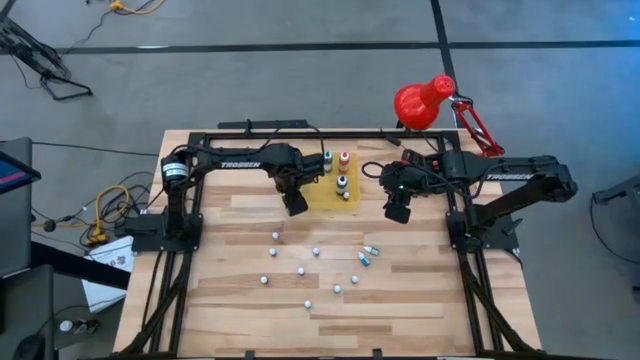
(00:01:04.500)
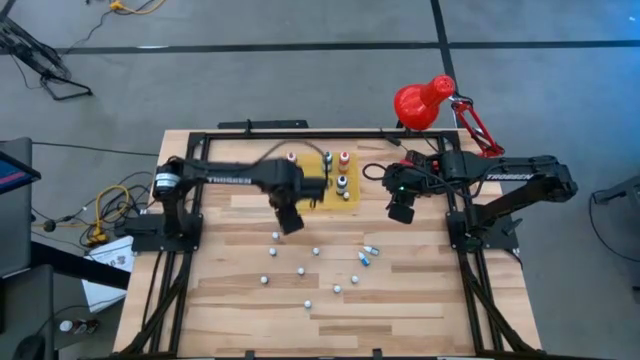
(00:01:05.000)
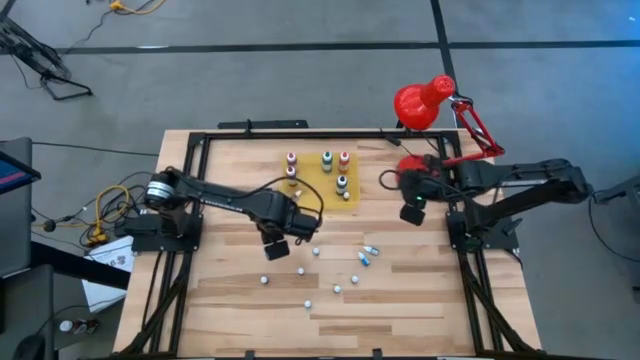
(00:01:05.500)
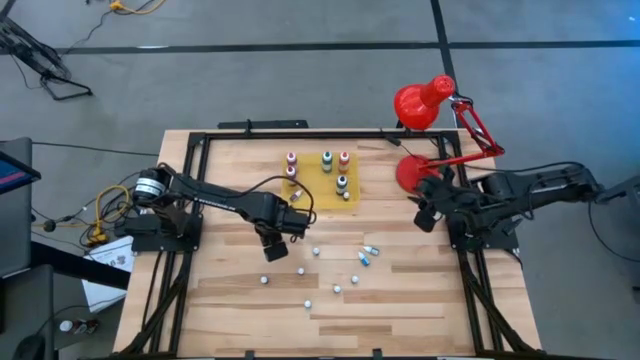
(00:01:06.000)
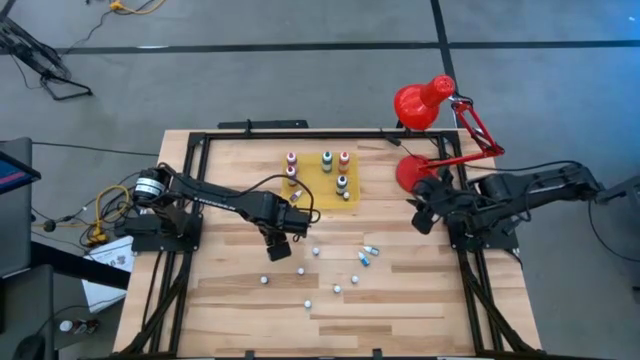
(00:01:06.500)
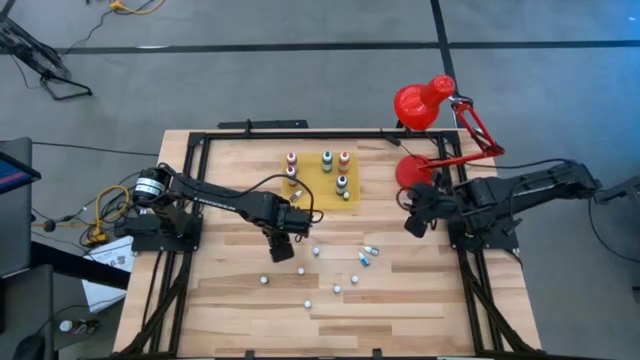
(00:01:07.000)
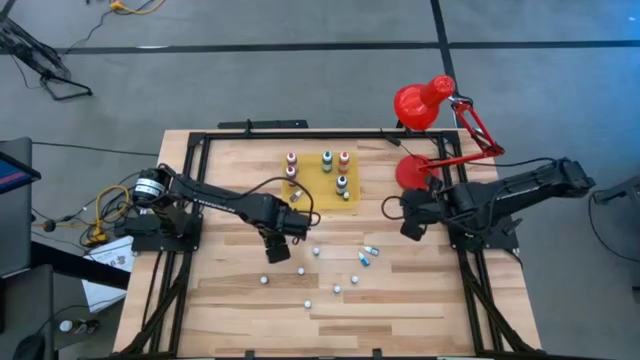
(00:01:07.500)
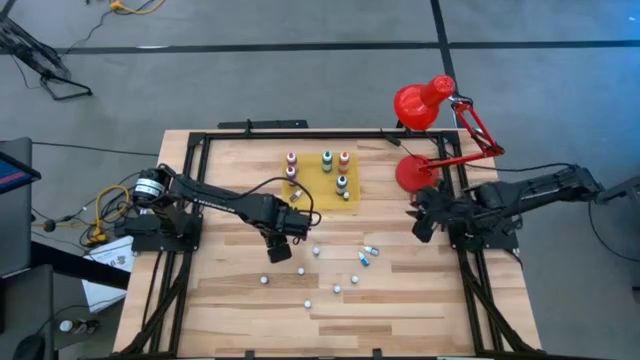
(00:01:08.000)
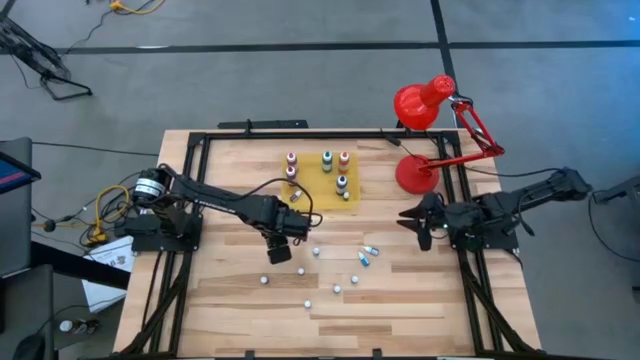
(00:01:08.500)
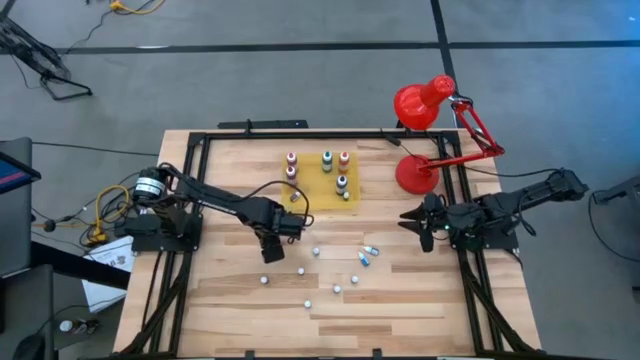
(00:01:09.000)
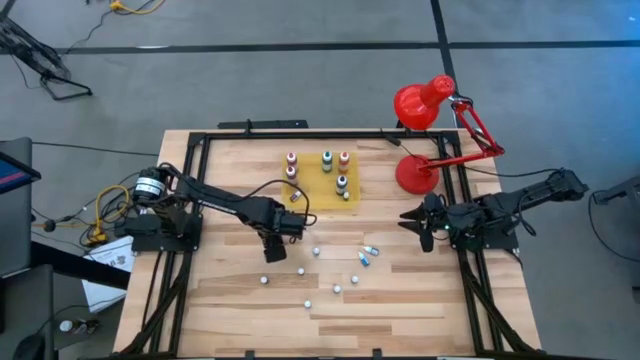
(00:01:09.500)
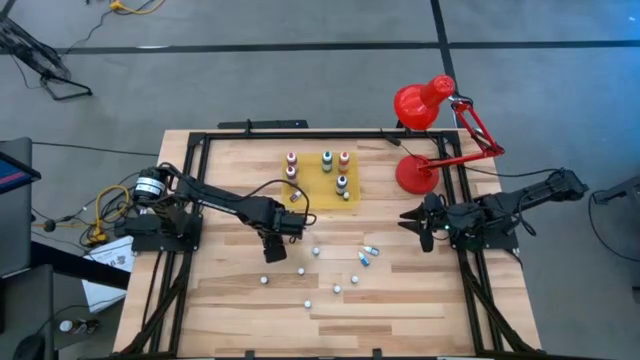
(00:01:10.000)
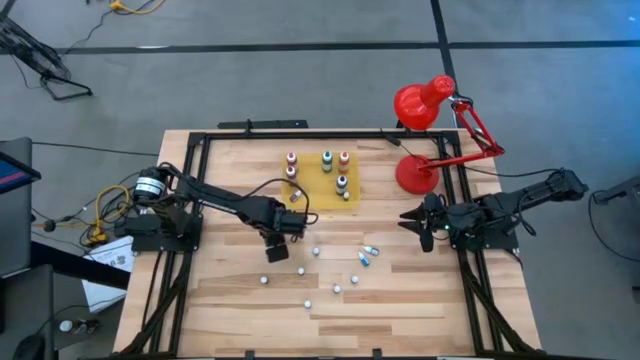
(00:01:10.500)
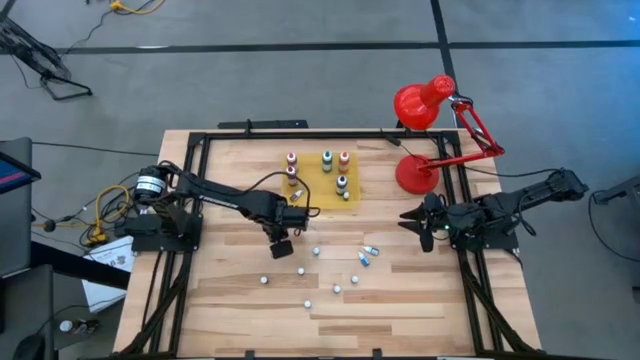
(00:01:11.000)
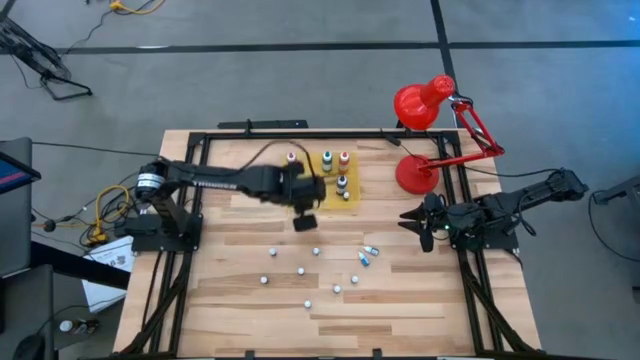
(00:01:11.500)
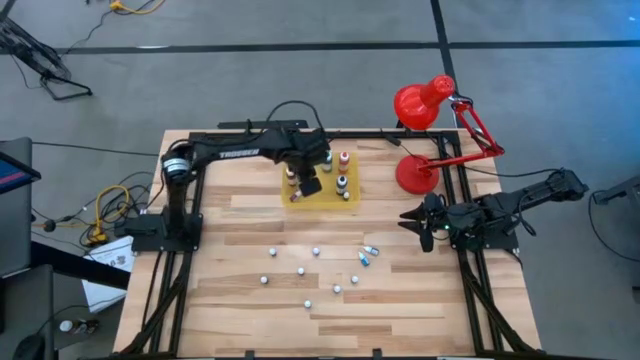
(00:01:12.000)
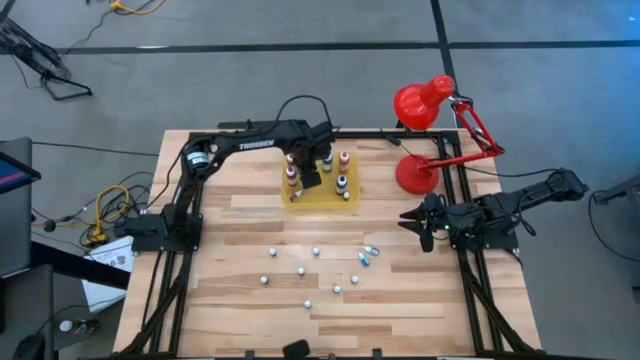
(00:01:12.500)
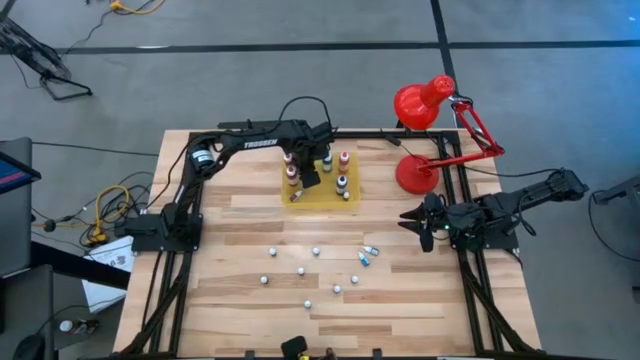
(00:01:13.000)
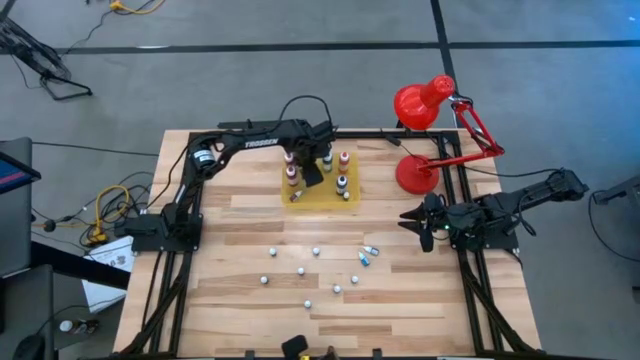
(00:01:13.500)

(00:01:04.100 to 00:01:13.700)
Task: Pick & Place food coloring
Put the small white food coloring in the bin

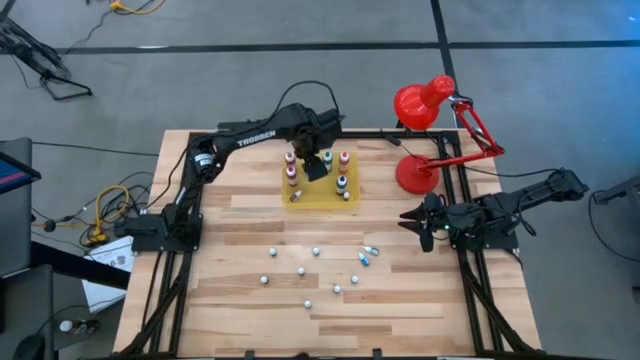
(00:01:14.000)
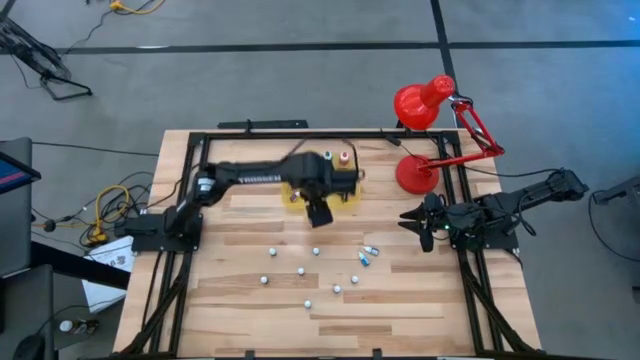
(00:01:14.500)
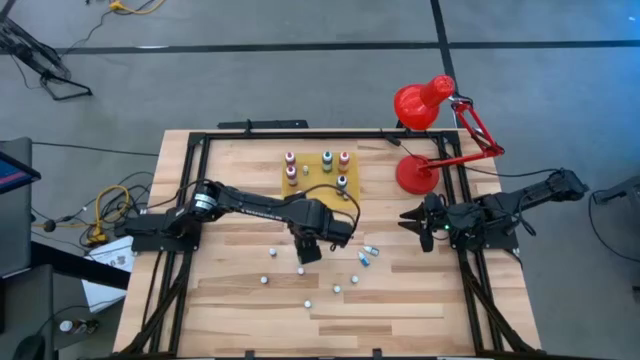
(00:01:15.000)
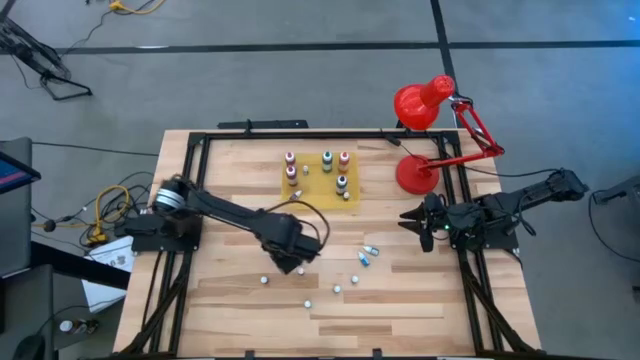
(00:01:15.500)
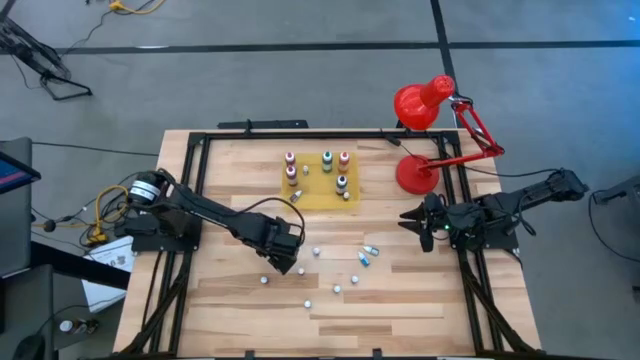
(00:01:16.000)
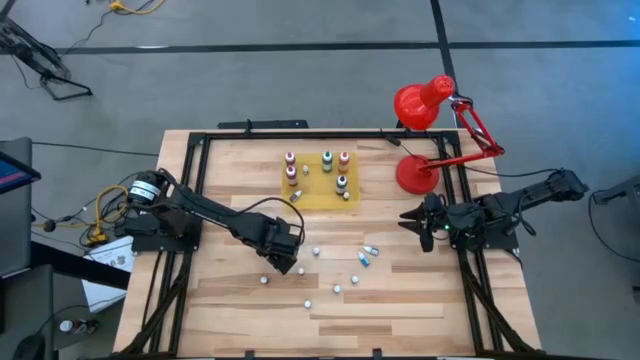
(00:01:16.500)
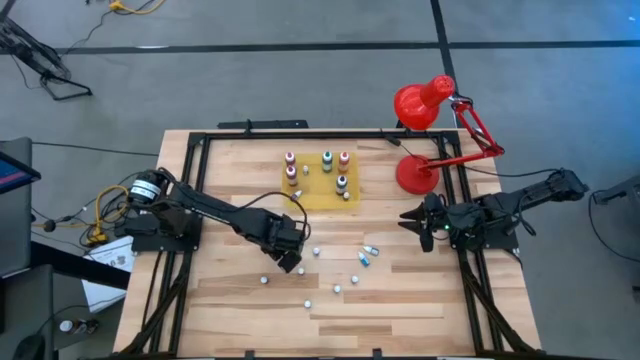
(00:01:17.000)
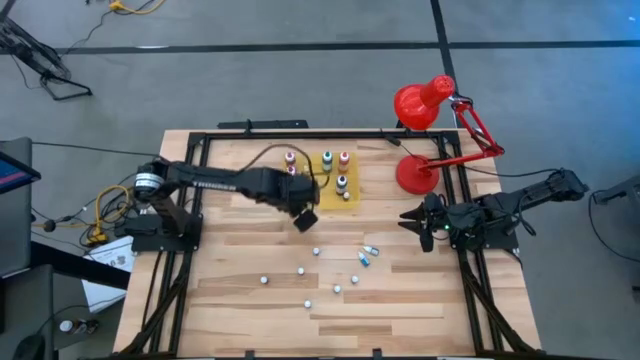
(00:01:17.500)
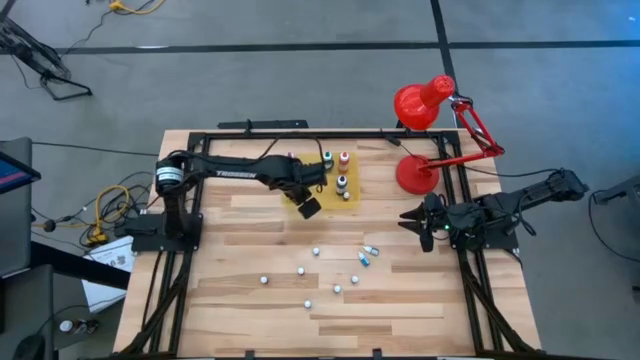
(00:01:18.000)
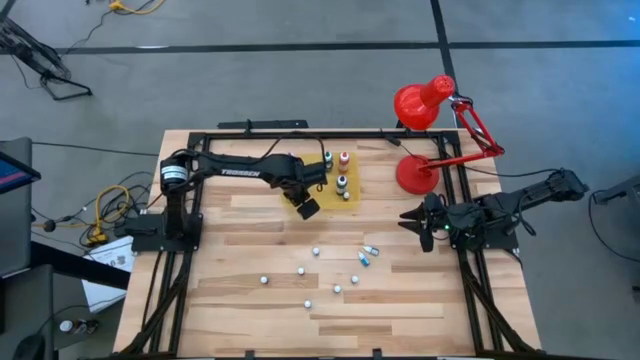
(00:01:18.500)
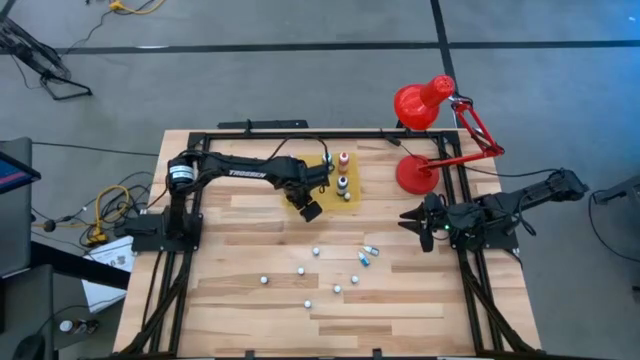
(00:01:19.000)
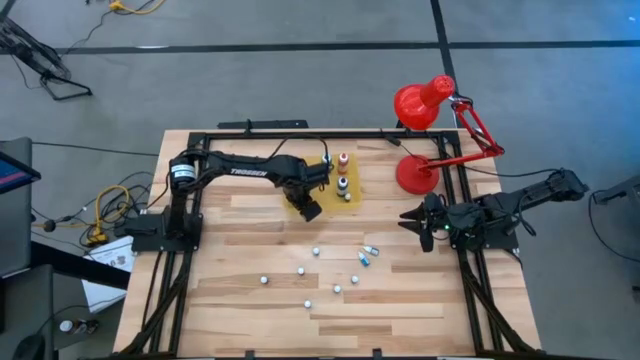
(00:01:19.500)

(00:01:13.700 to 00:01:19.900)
Put the small white food coloring in the bin

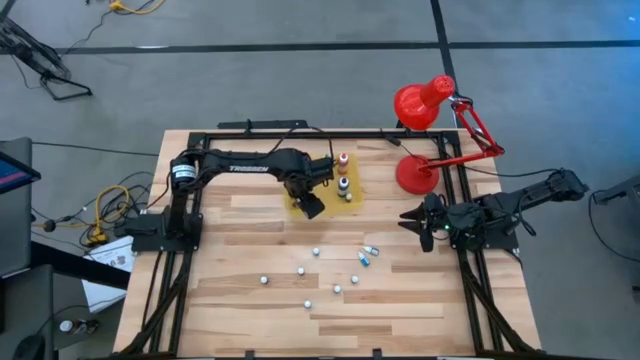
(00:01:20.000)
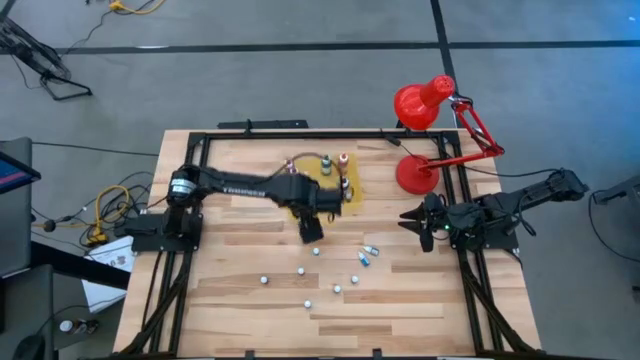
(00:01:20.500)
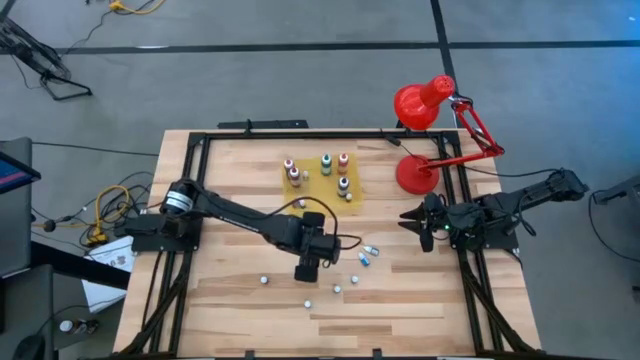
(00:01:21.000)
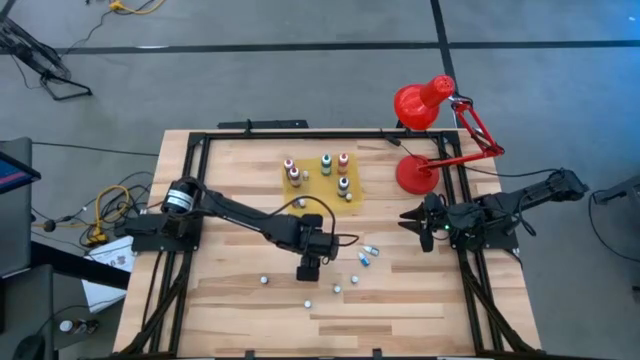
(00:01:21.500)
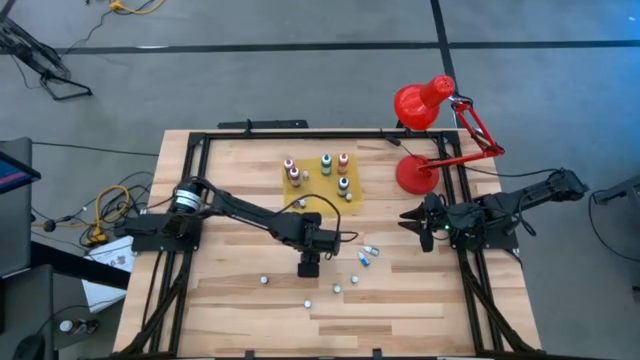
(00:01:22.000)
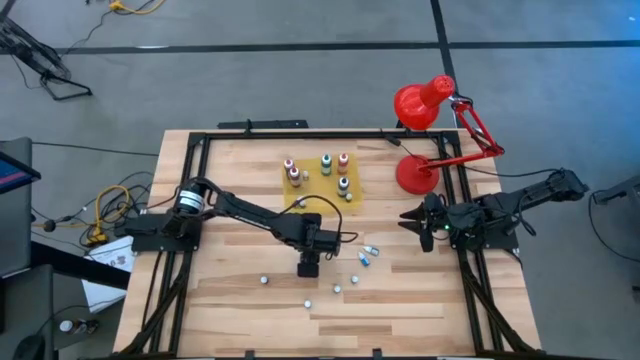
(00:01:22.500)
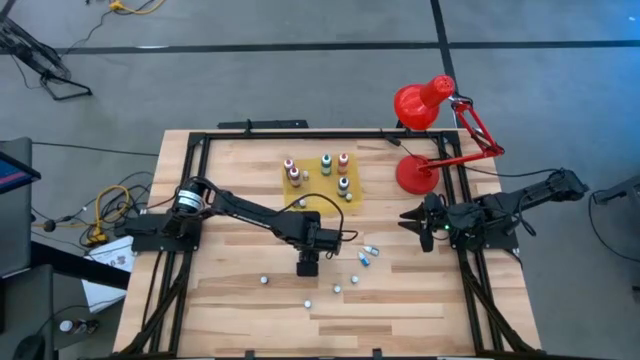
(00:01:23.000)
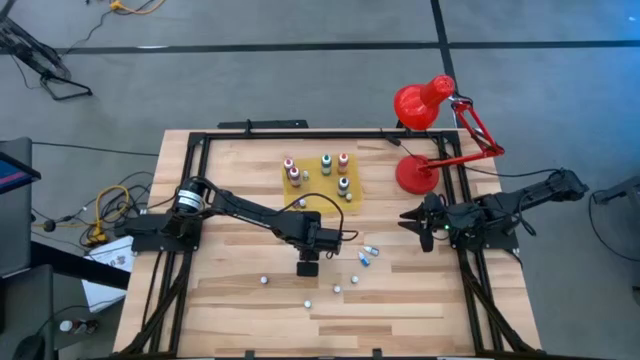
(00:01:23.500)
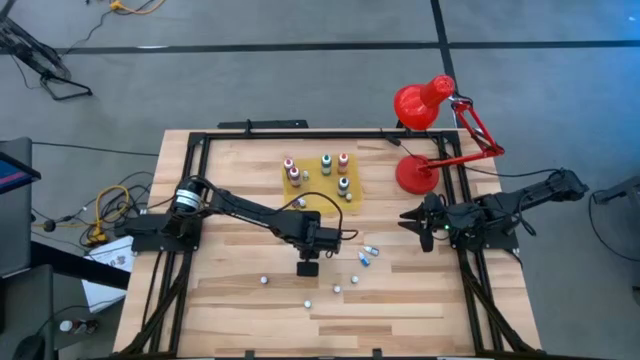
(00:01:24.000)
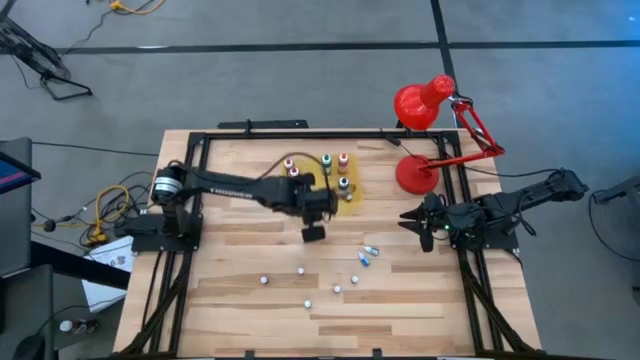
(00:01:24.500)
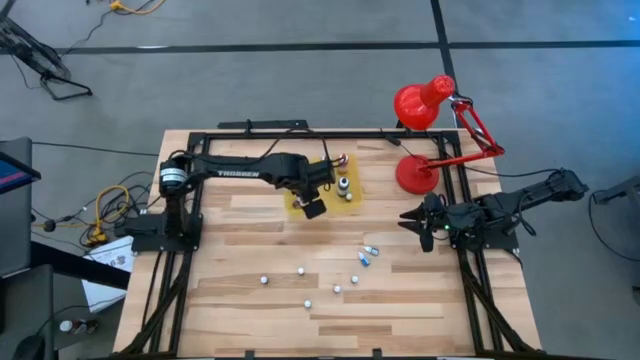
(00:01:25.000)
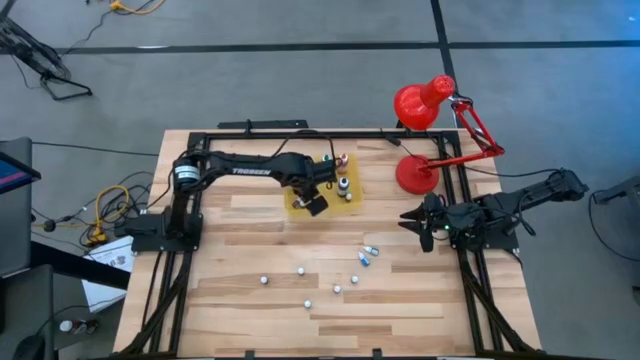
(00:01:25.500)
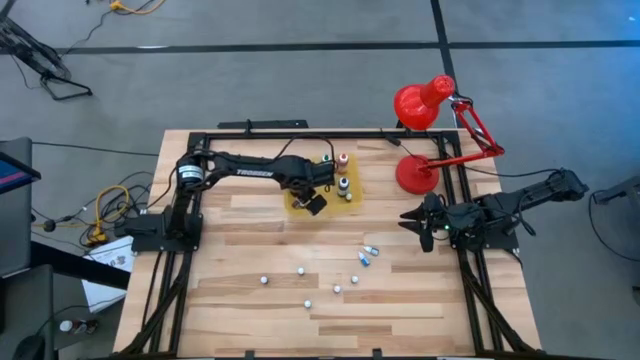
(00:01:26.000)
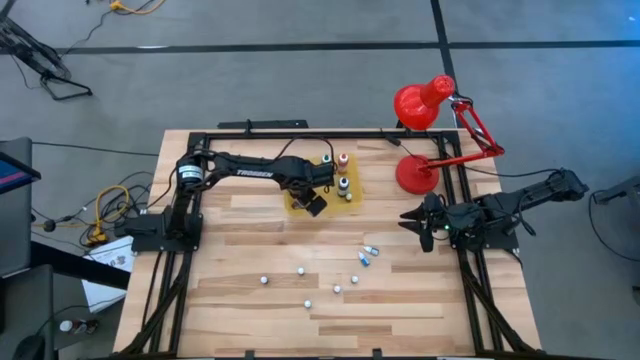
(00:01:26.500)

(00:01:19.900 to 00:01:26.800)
Put the small white food coloring in the bin
